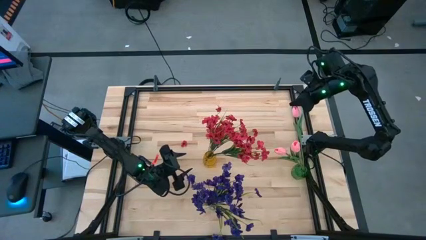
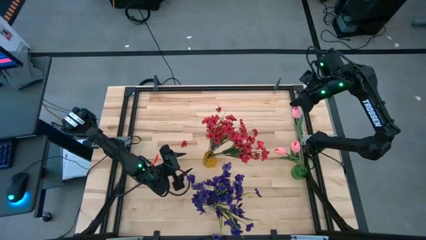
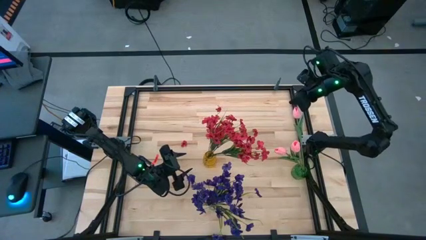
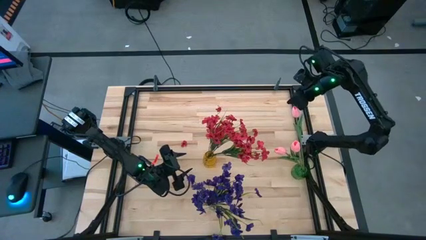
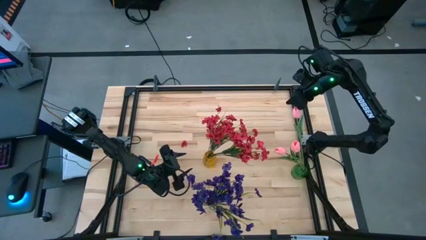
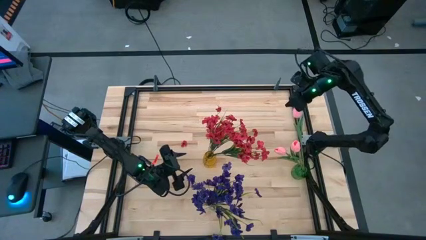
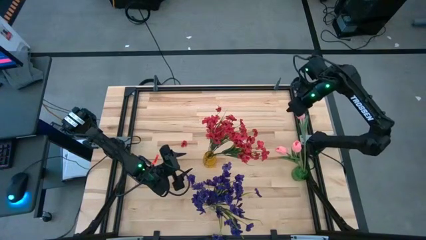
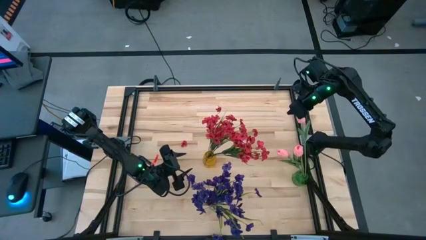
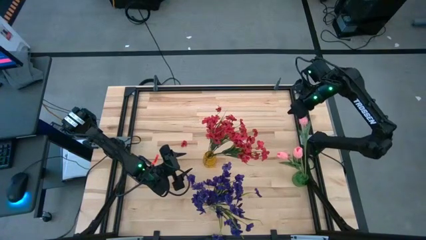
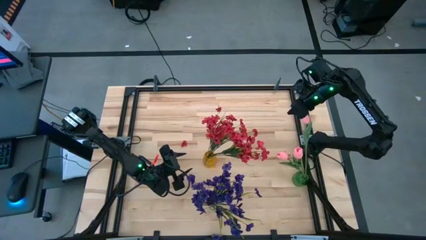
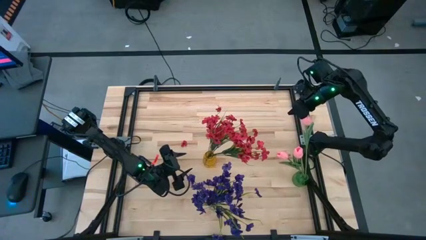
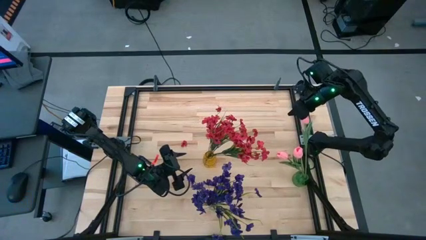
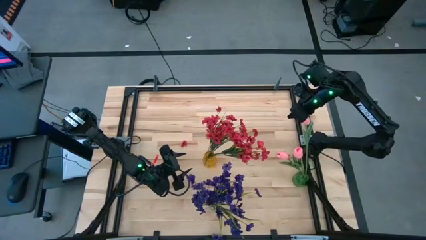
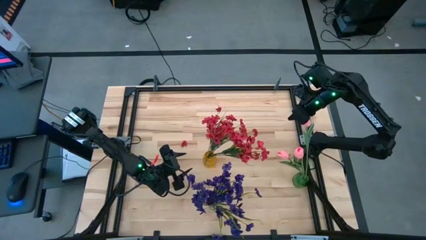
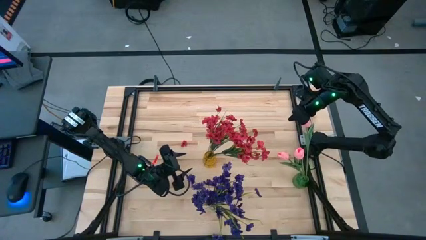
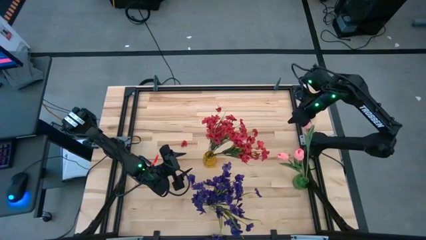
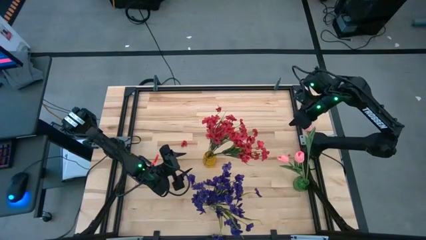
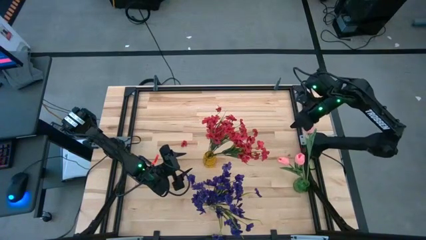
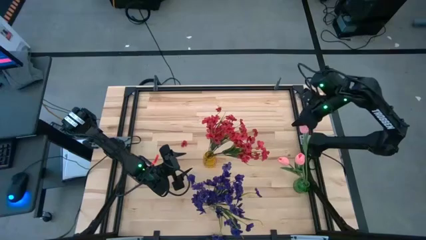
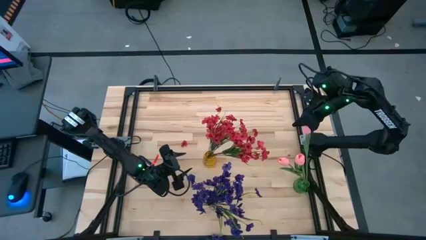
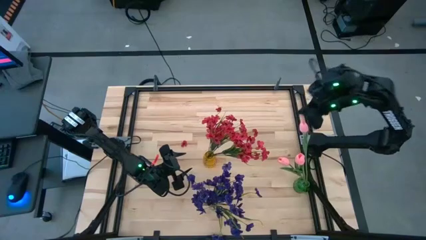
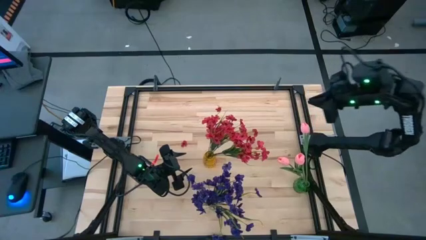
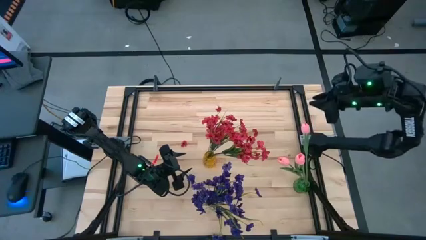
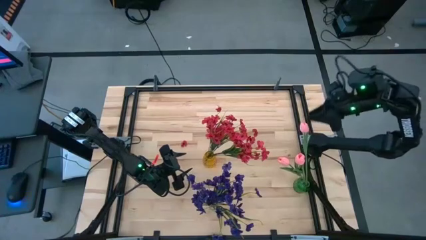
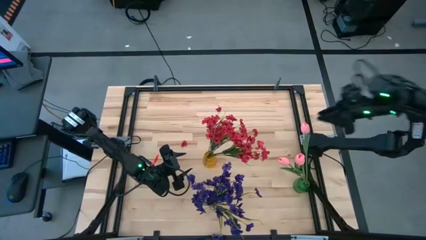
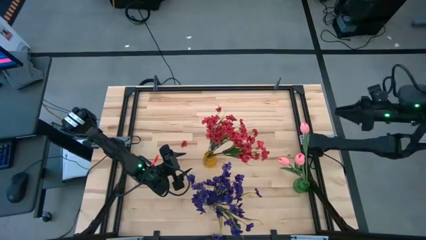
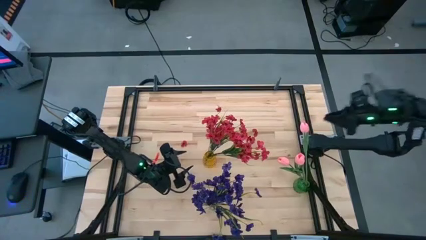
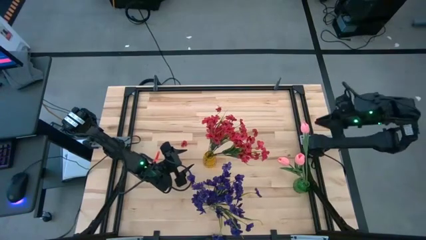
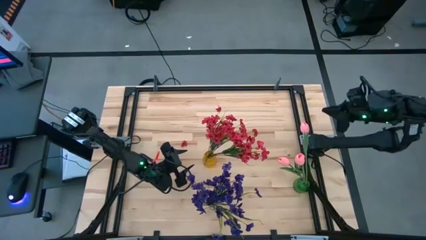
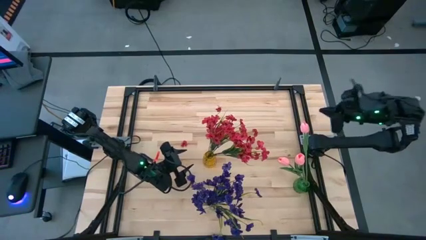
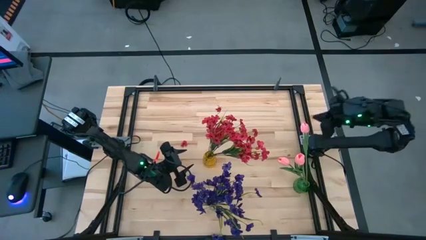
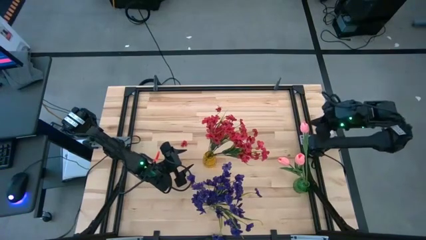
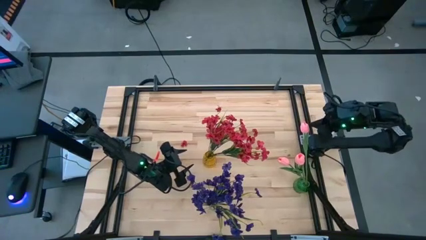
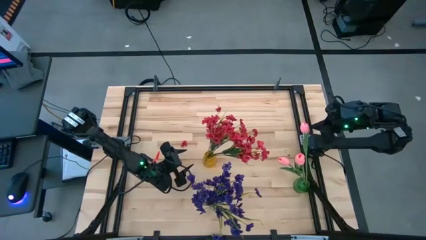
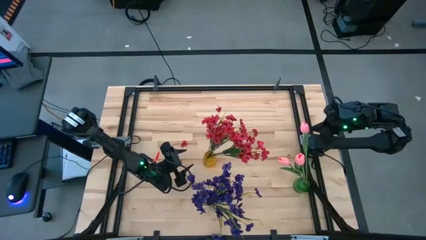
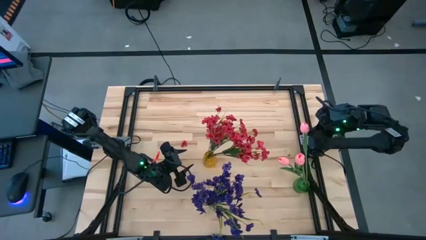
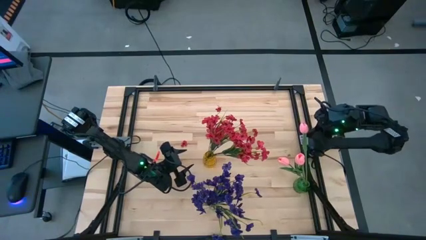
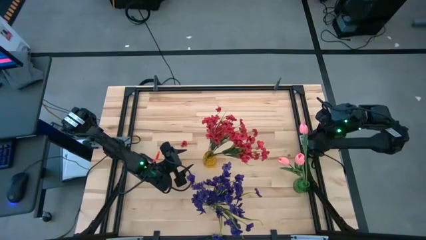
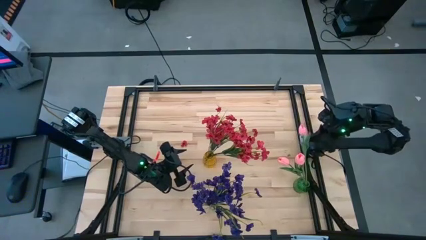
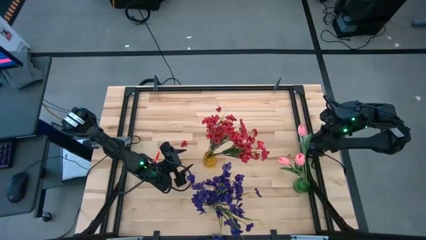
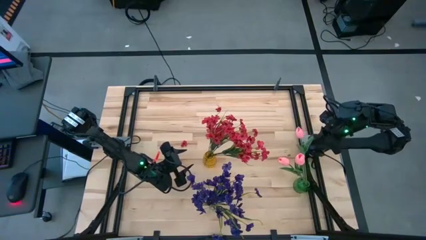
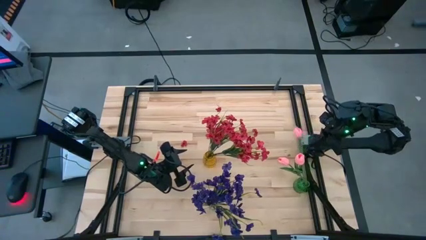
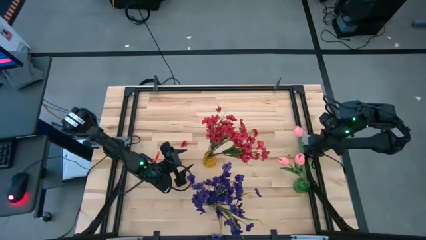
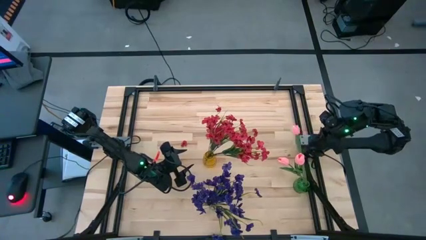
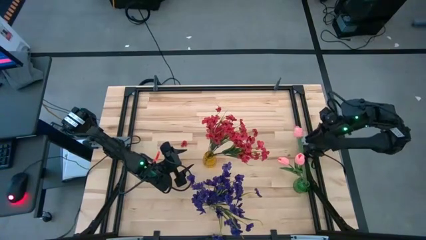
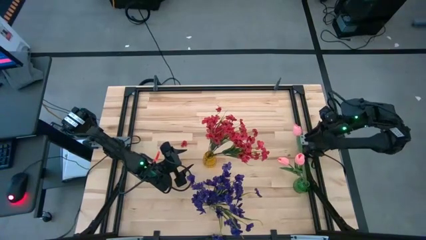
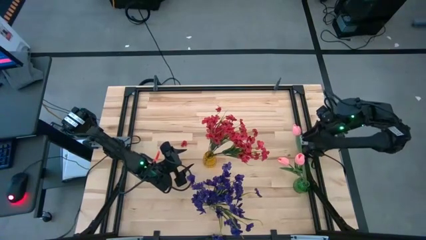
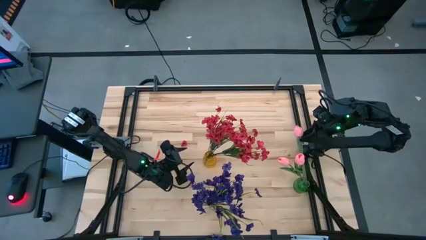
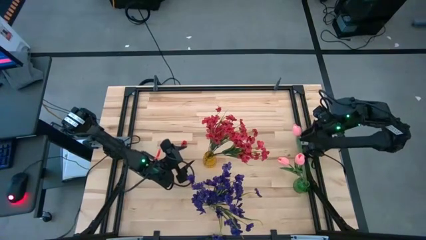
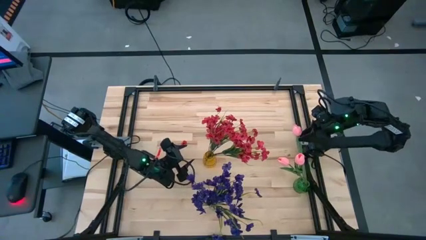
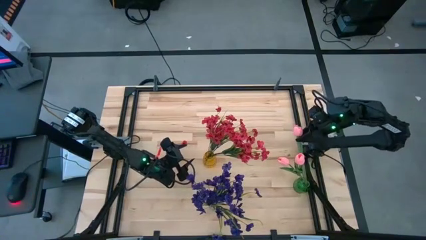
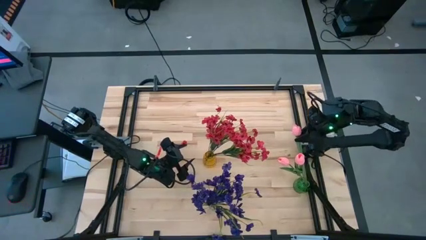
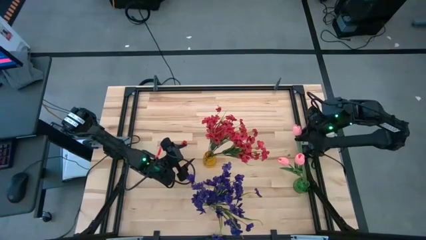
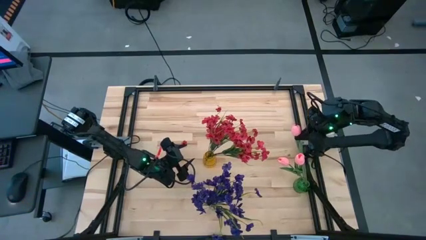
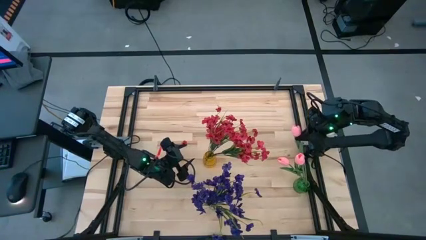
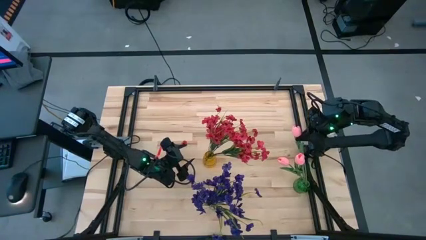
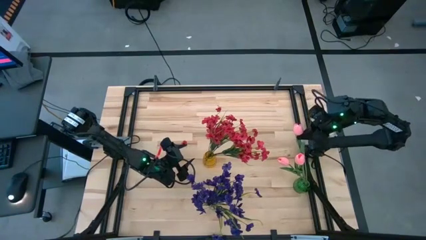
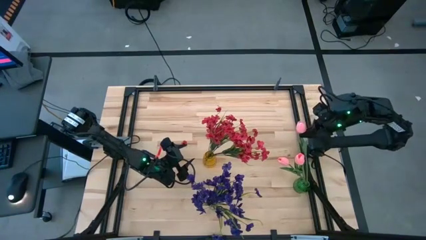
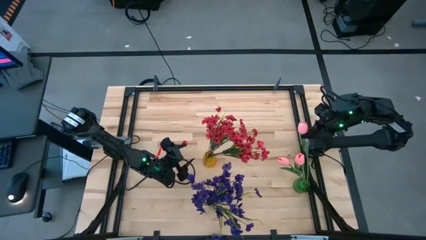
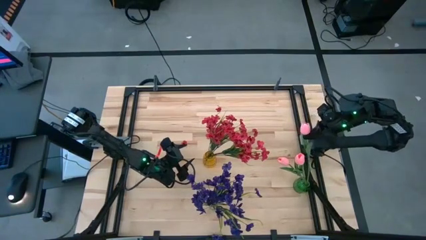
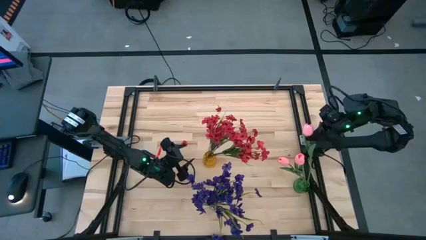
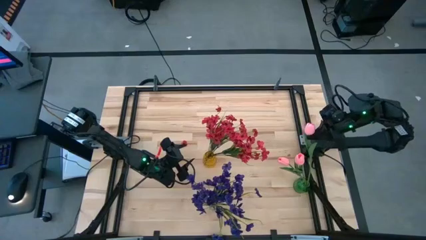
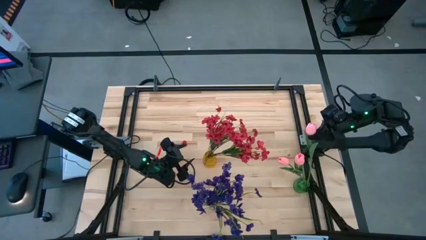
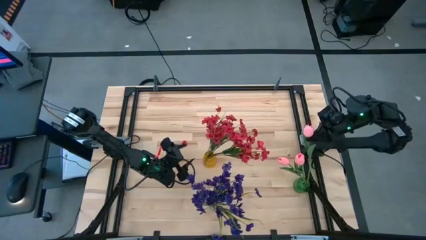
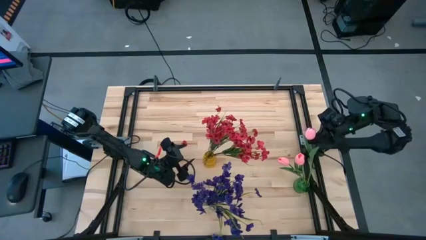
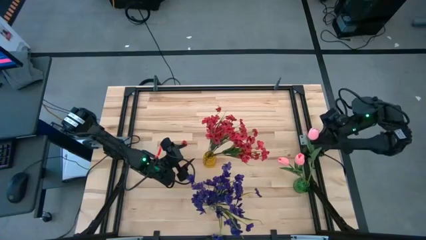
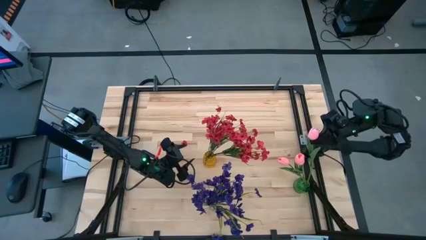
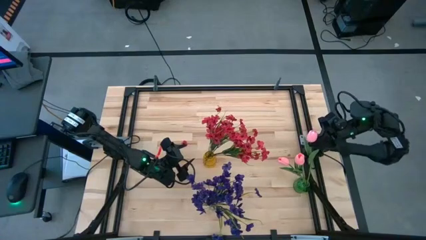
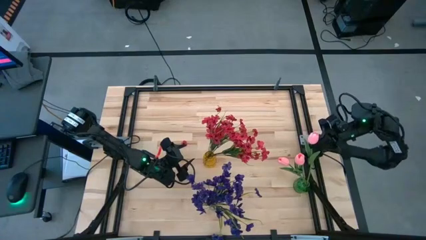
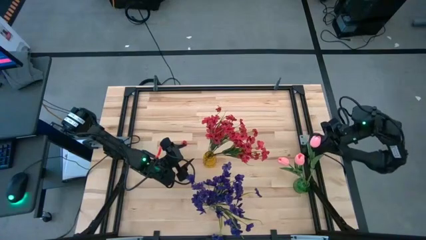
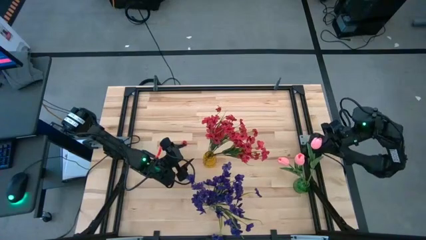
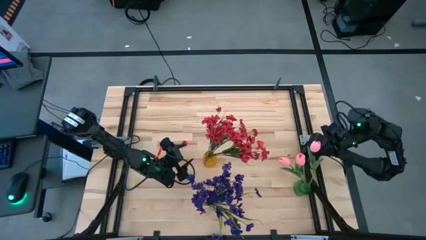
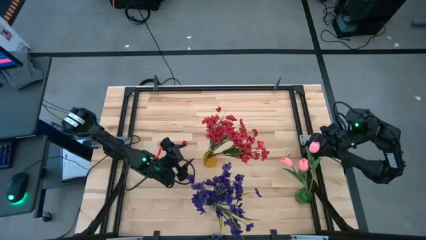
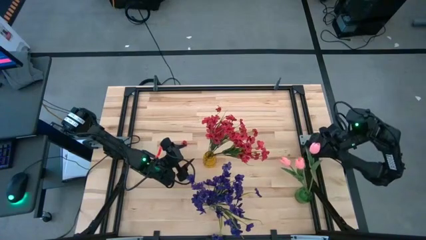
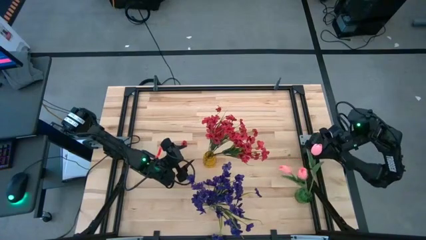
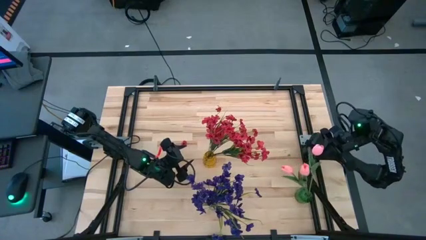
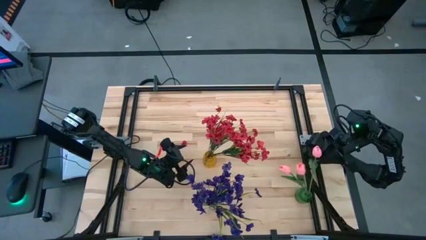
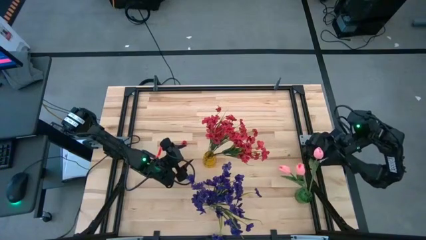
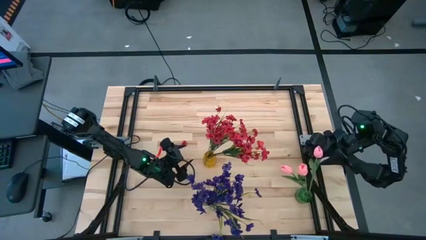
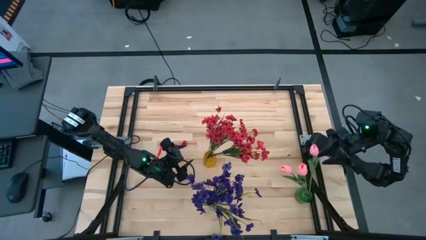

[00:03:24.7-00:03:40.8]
Task: Sort flowers into vase by color
Put the pink tulip into the green vase
